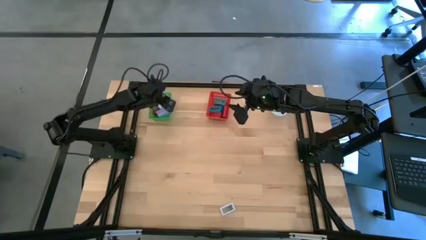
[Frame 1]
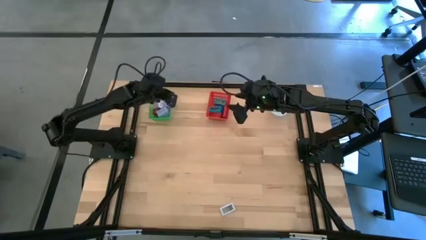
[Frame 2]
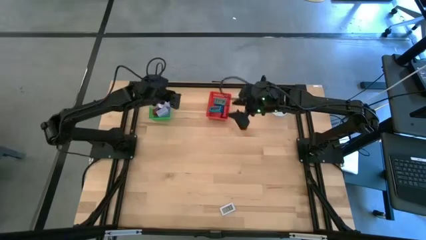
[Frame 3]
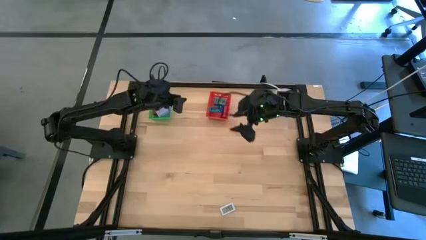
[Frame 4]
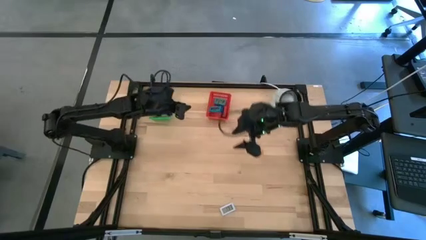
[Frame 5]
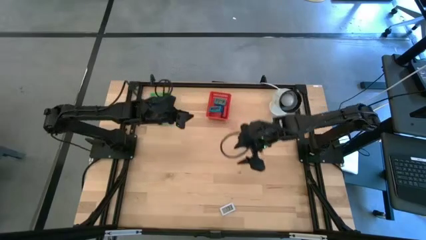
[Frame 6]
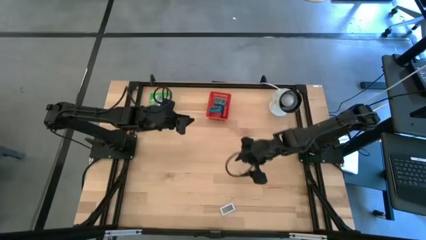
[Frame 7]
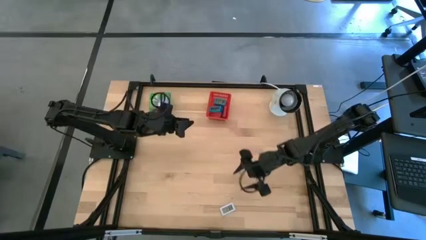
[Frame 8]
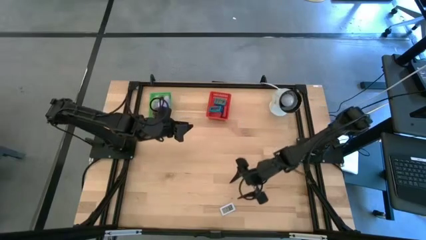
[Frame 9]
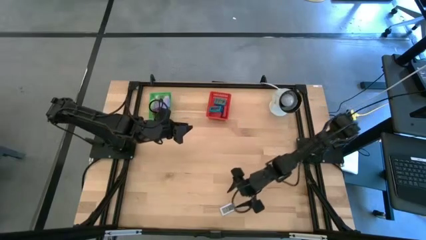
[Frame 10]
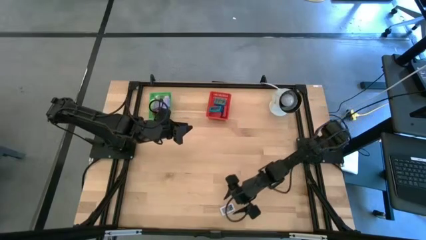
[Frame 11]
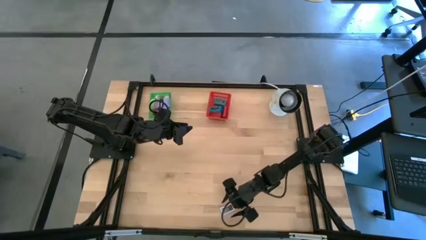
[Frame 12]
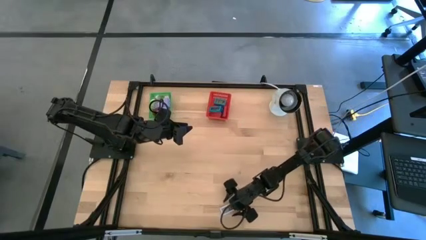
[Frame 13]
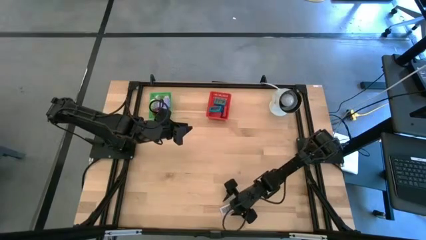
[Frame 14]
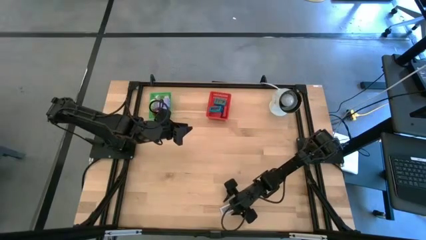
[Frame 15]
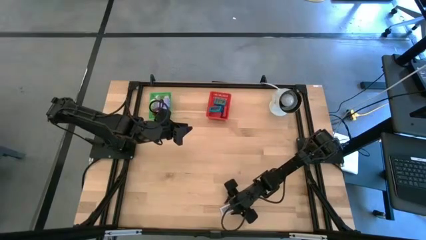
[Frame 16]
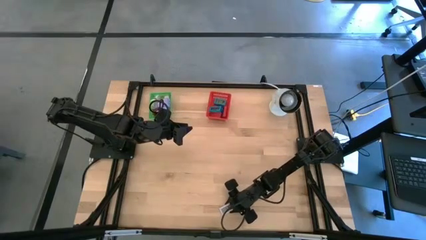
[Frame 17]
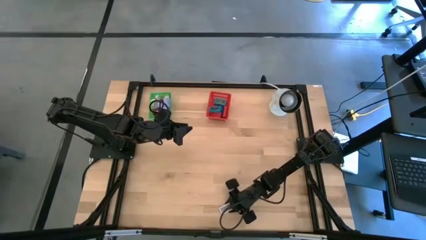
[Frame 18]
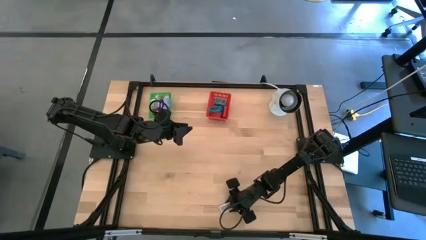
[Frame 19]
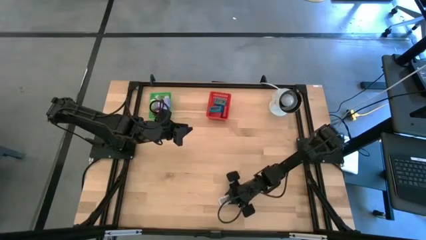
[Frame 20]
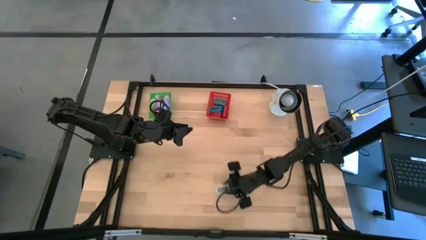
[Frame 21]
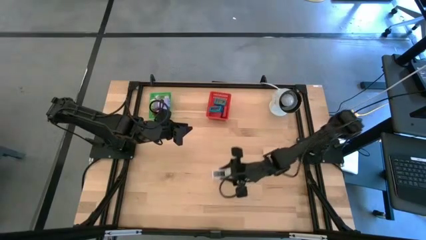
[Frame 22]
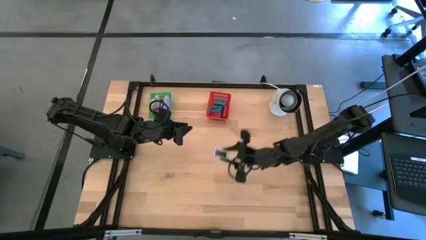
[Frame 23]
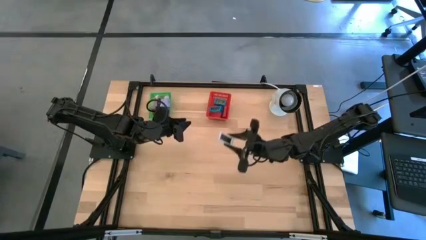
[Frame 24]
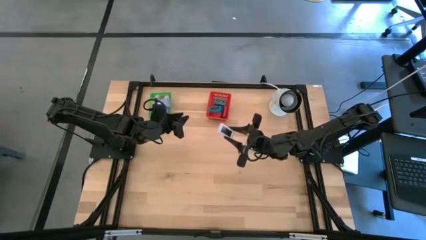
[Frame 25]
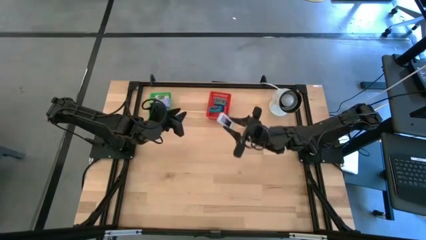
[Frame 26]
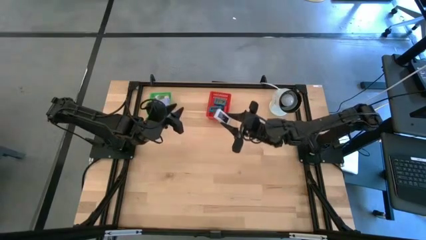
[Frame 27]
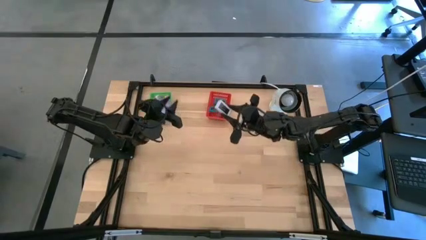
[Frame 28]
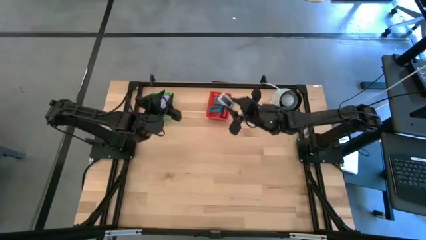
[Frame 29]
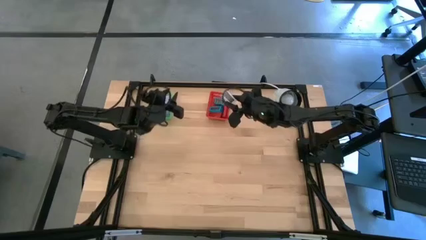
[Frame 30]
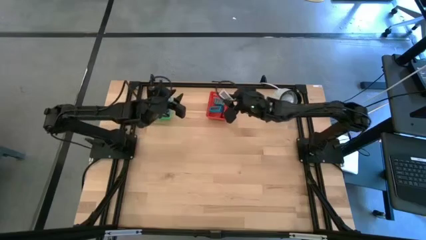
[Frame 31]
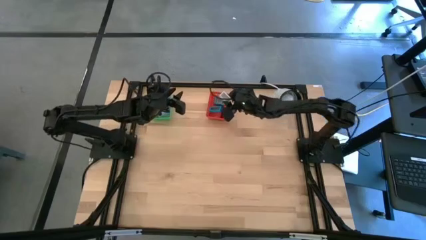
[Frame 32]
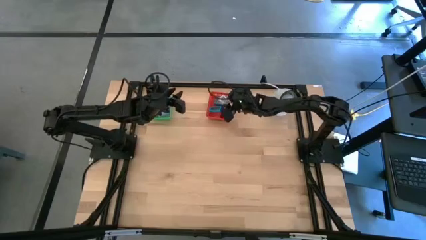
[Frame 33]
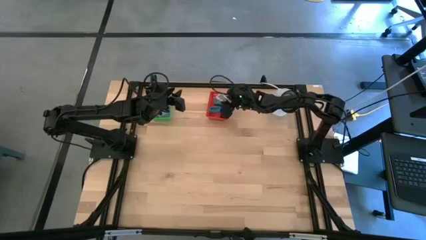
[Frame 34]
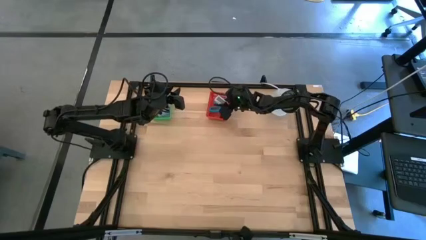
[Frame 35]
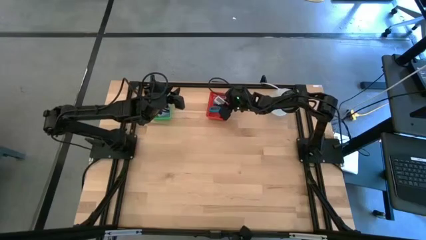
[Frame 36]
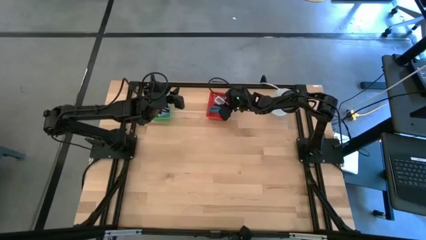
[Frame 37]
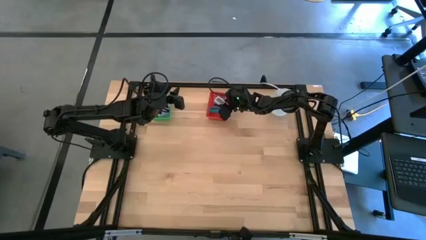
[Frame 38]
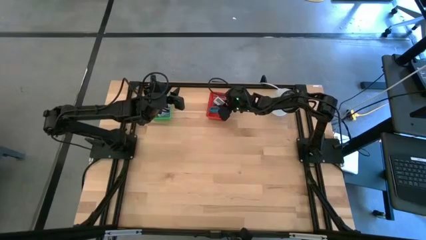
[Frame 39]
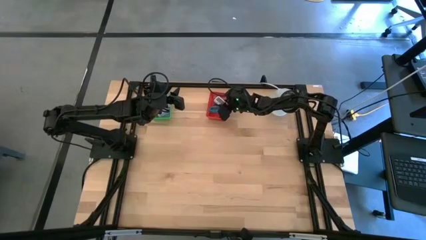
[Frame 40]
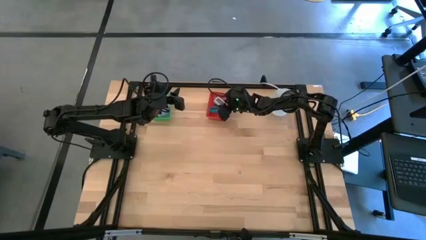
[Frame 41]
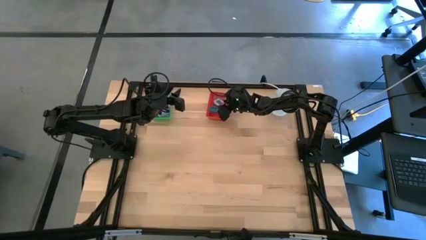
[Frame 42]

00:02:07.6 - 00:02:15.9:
Task: Pick & Place Office items
Put the white digital timer into the red bin

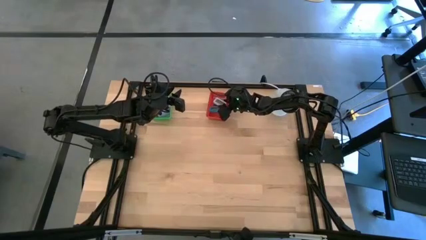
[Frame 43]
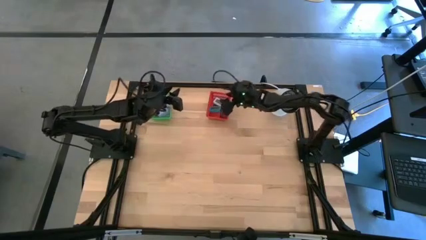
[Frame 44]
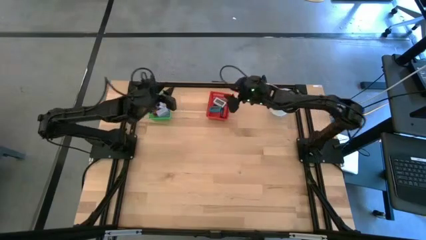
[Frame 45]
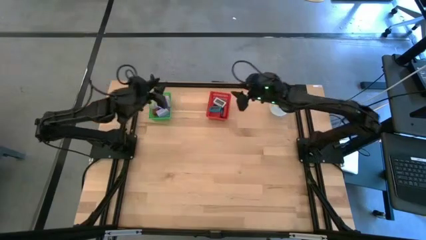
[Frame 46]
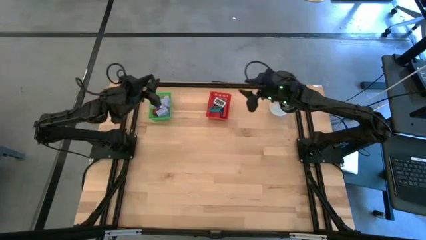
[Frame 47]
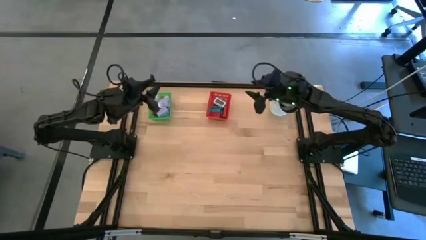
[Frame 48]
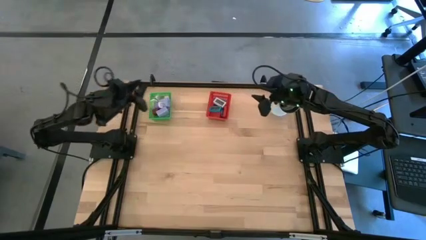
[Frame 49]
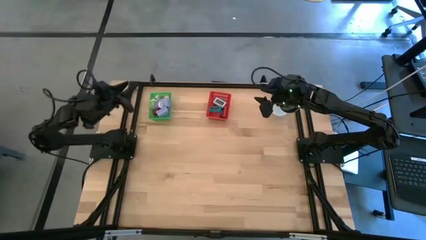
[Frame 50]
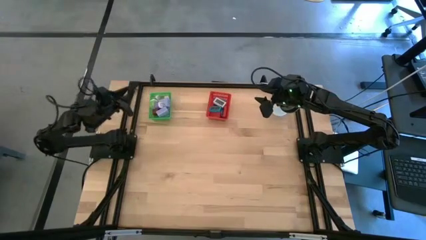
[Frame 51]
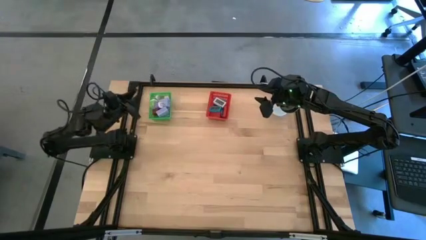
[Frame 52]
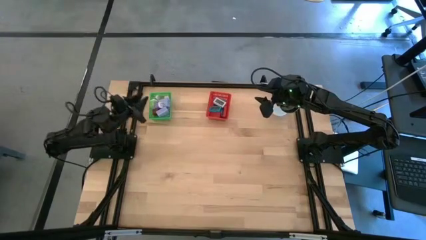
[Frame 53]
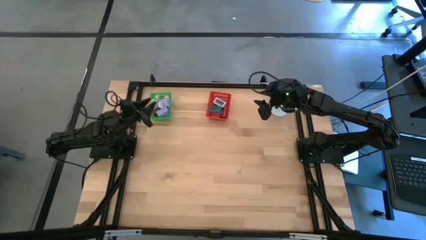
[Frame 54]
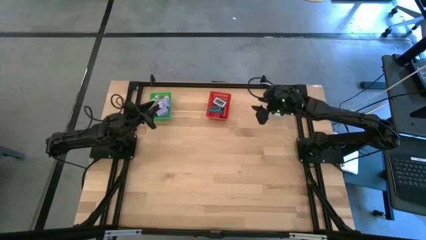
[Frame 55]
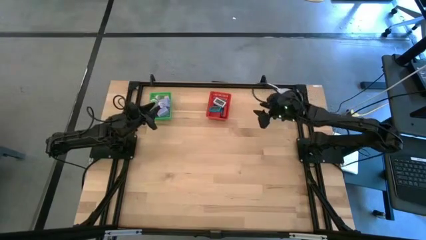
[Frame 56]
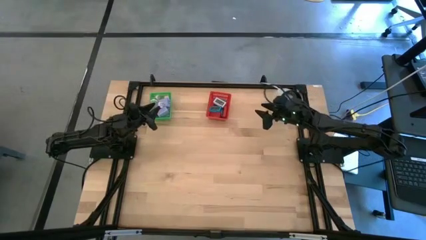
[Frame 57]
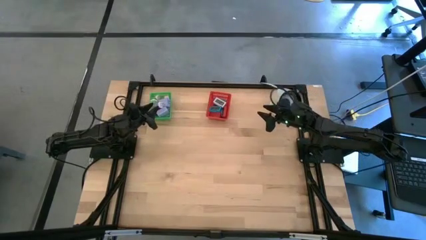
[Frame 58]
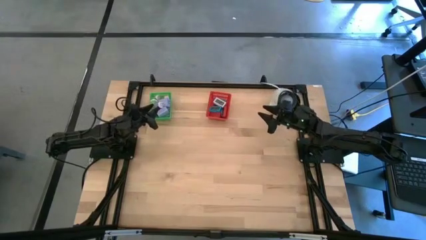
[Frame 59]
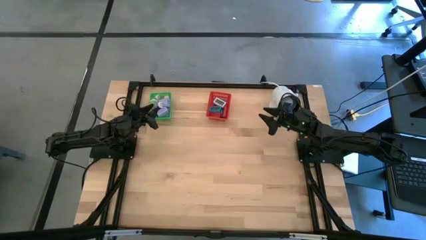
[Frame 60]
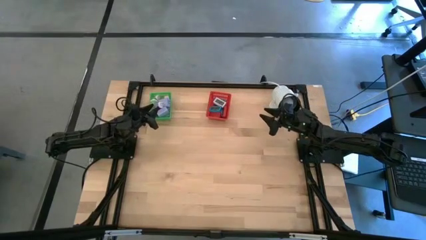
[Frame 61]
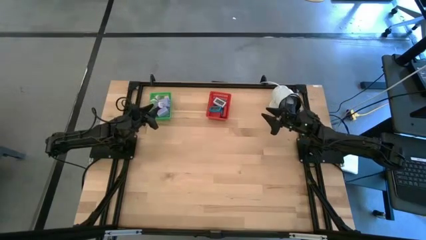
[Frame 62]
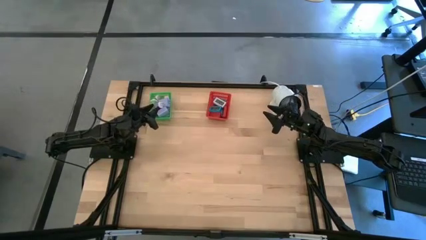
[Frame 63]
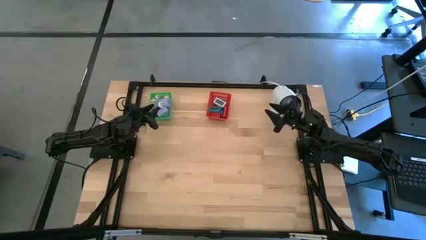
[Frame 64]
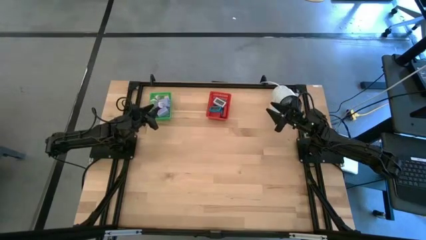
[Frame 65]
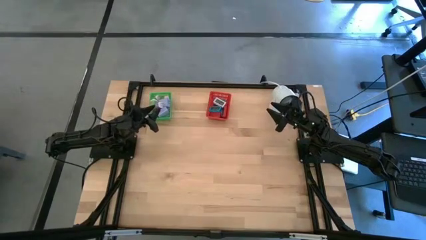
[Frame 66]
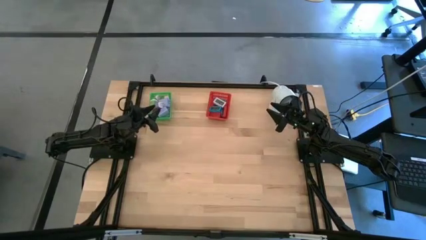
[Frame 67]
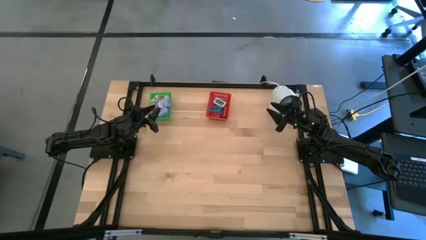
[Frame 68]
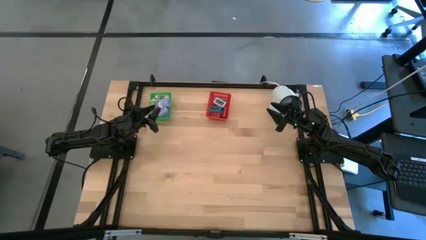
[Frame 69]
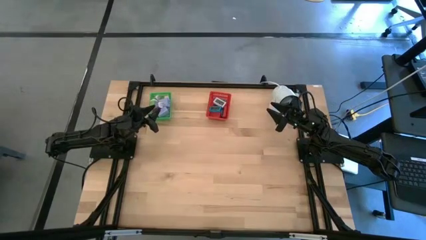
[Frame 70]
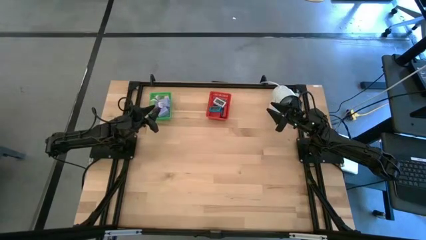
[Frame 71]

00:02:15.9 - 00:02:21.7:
Return to Home Position
